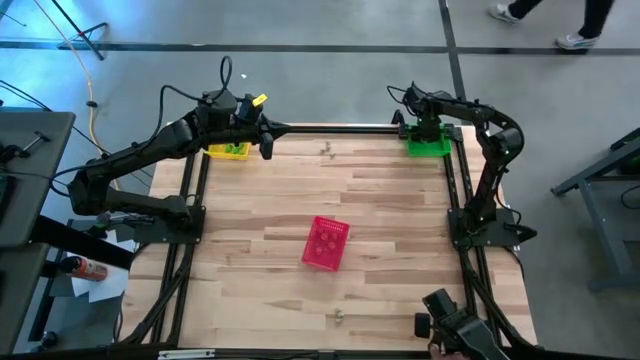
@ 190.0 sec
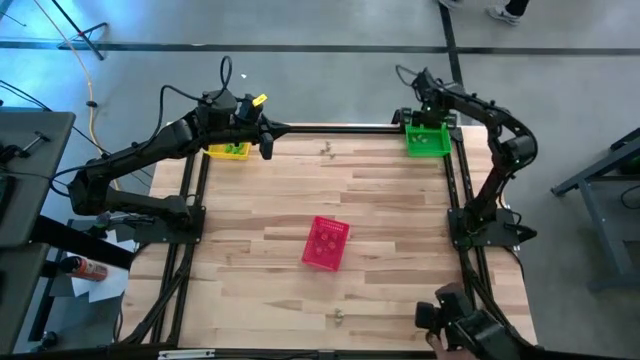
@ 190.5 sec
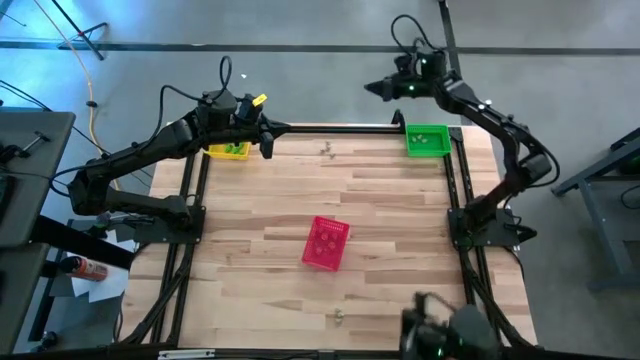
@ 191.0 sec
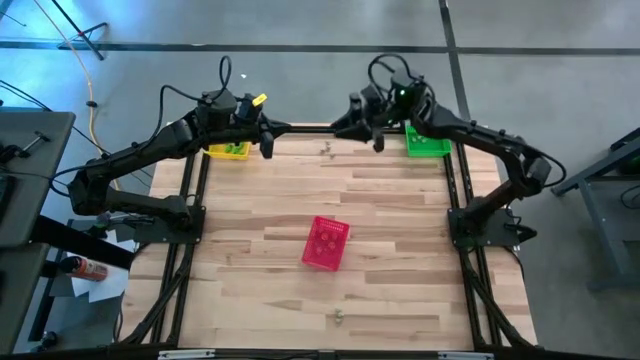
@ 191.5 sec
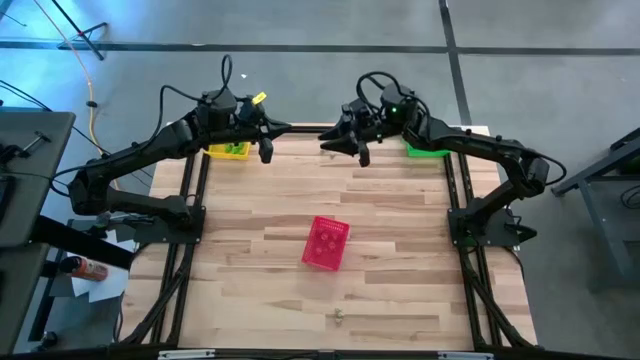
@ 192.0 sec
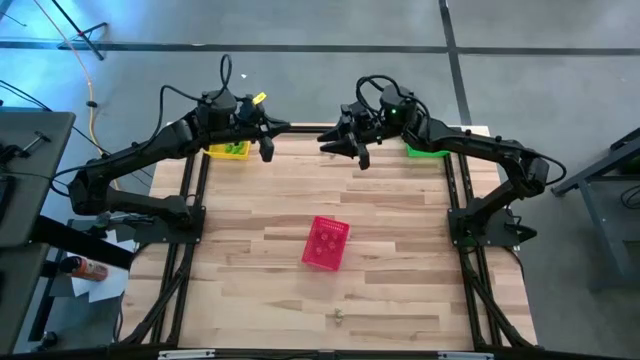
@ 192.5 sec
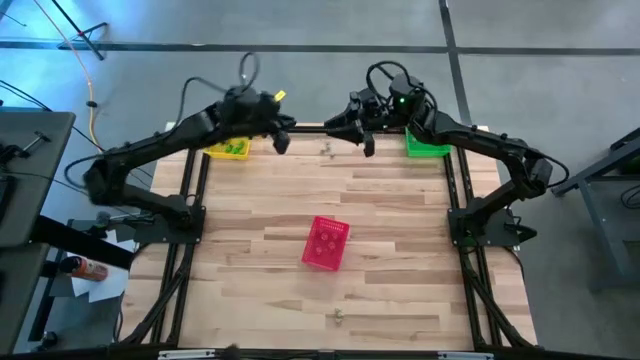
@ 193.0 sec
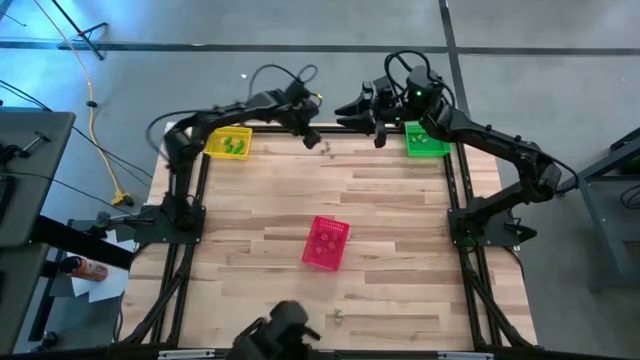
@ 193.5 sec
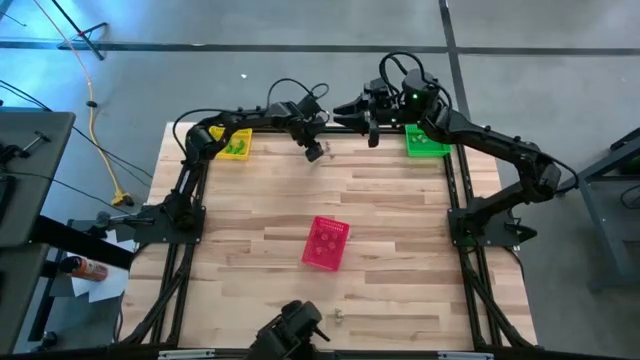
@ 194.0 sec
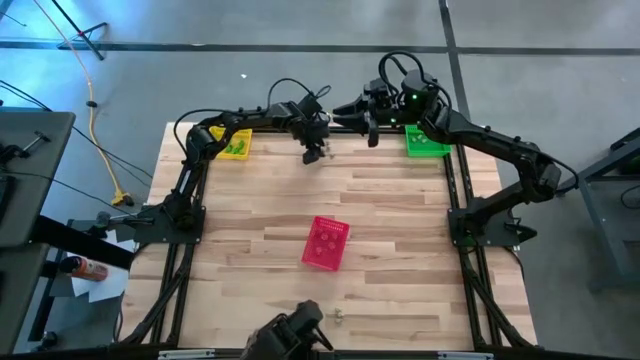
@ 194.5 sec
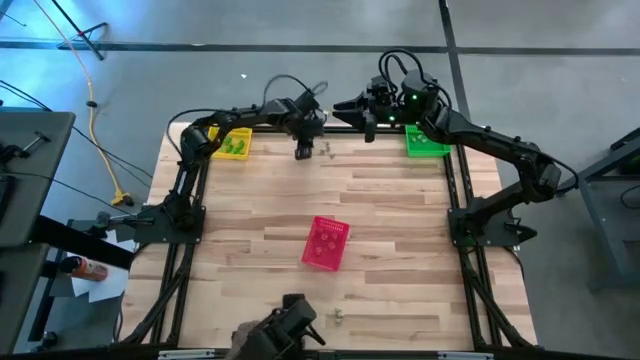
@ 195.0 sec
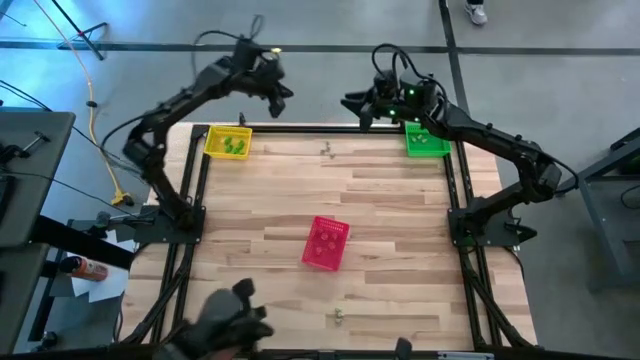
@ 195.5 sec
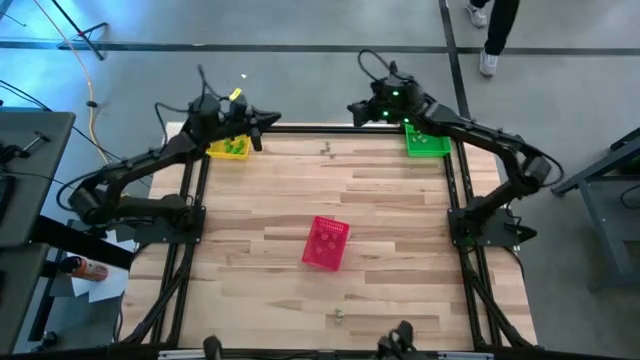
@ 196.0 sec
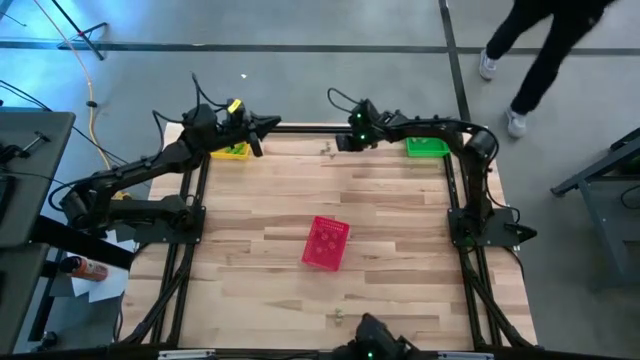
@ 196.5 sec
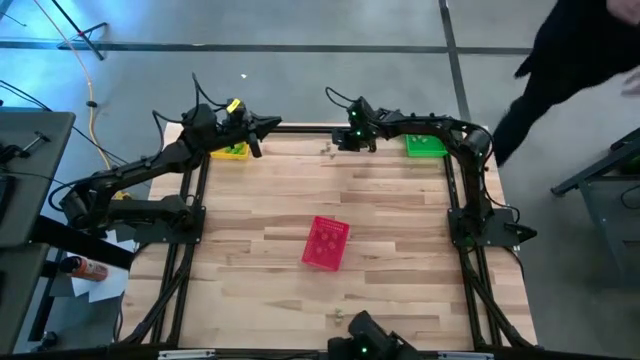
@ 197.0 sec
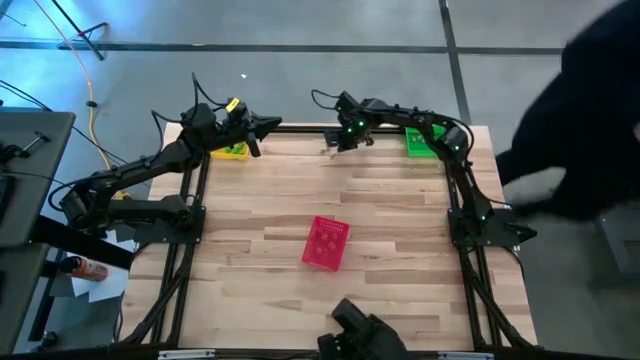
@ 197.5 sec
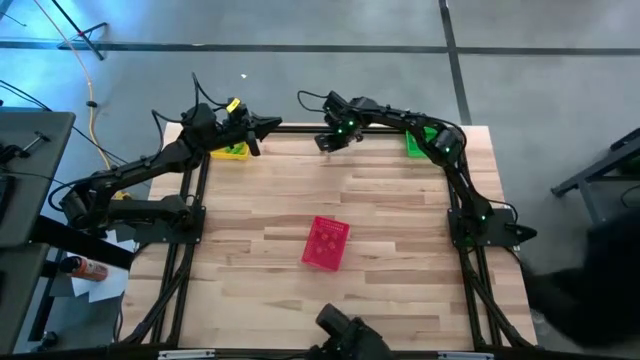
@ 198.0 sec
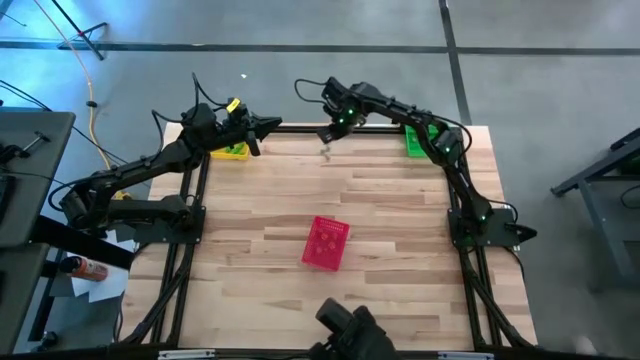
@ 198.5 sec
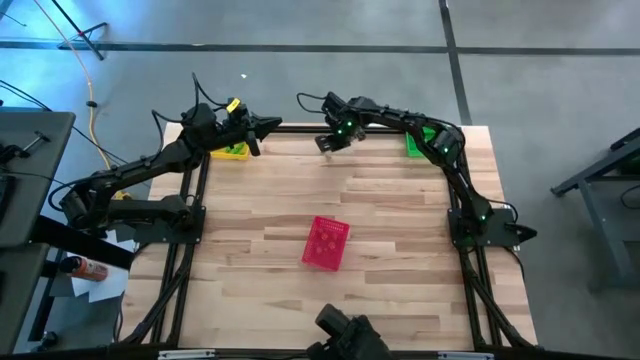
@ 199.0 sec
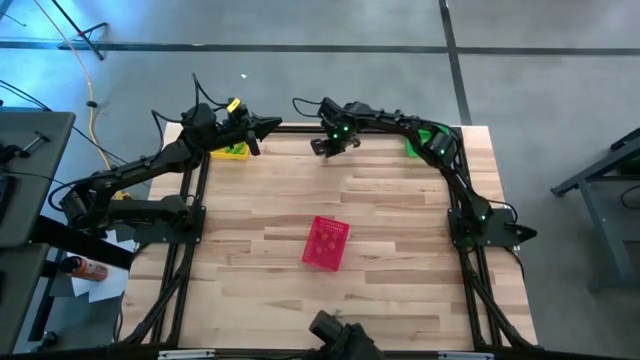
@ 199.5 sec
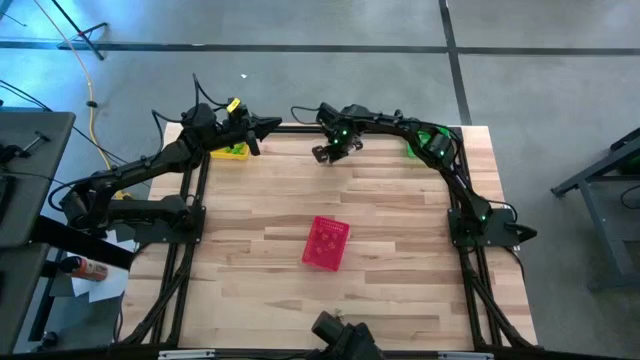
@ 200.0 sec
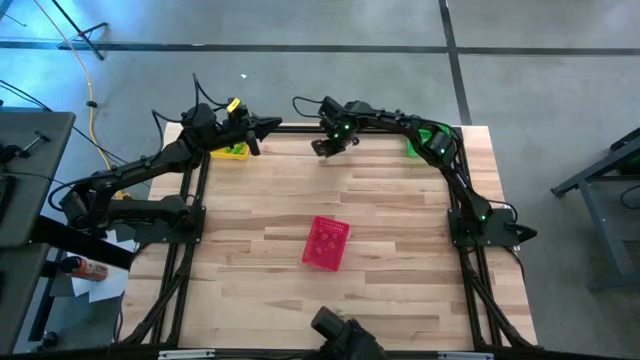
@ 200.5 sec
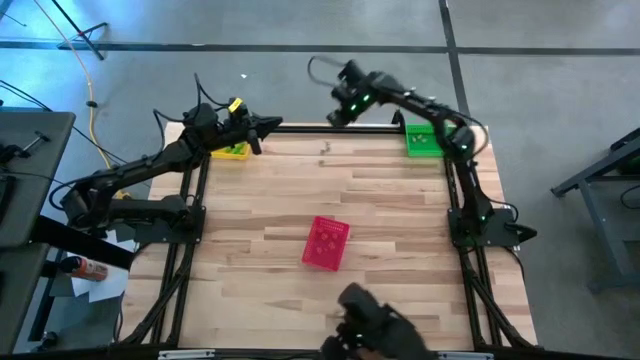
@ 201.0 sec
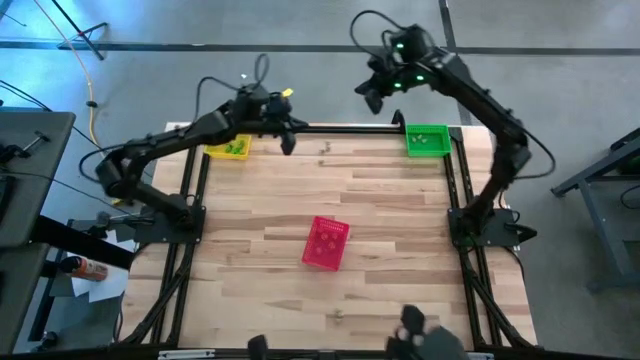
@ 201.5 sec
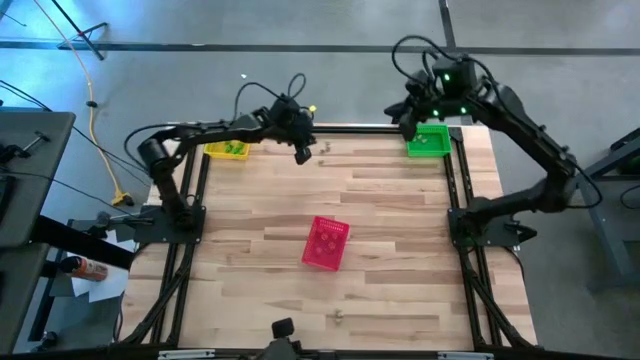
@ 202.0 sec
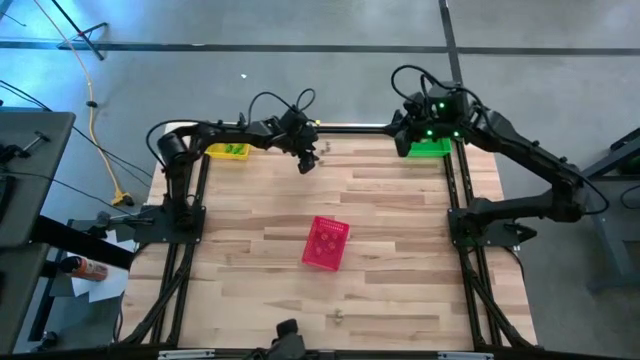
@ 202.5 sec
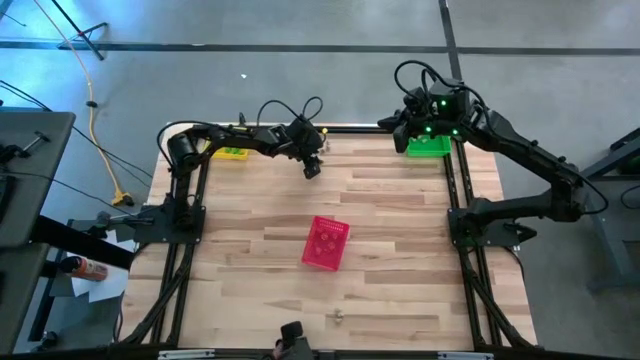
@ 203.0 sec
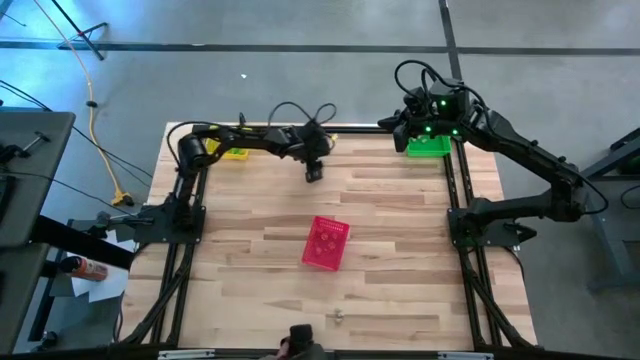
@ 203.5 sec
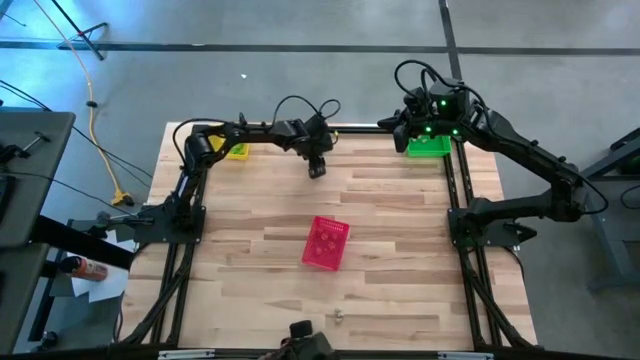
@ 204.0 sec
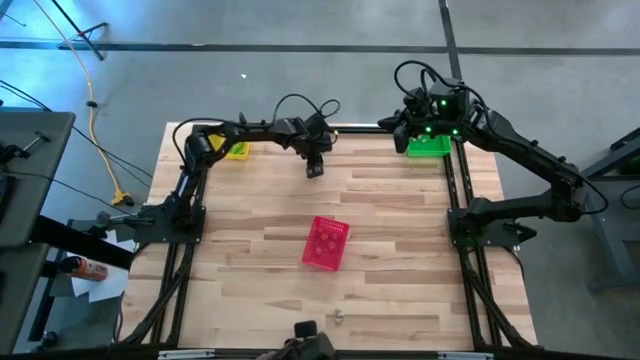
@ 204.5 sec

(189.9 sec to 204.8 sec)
Task: Sort Halloween decoration
Put the white skull toy into the green bin

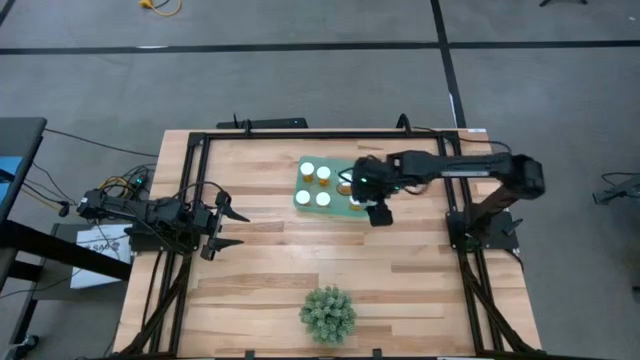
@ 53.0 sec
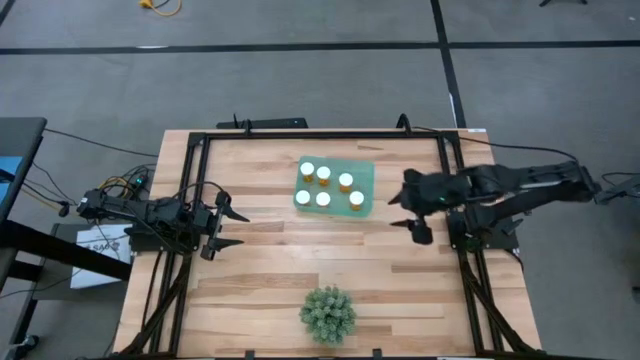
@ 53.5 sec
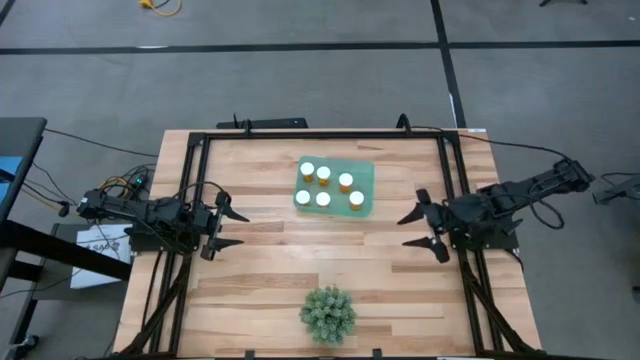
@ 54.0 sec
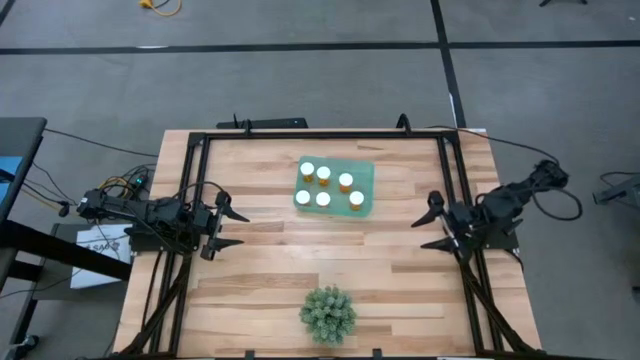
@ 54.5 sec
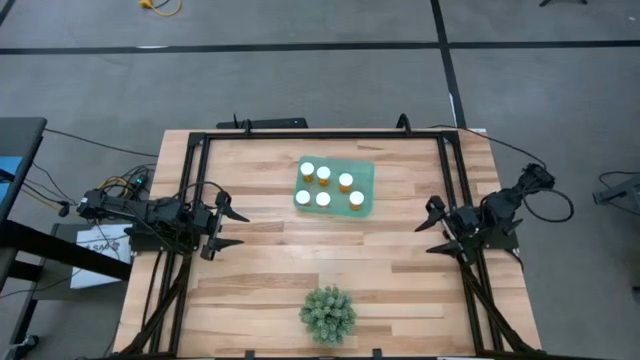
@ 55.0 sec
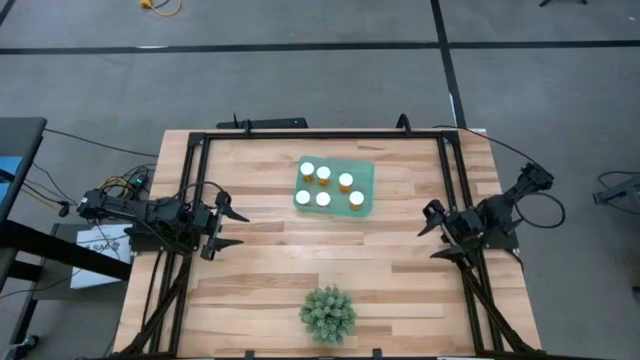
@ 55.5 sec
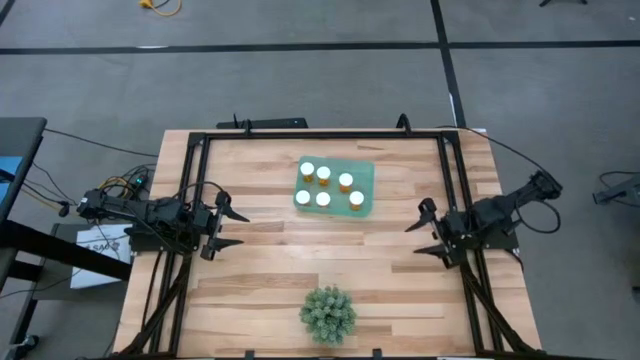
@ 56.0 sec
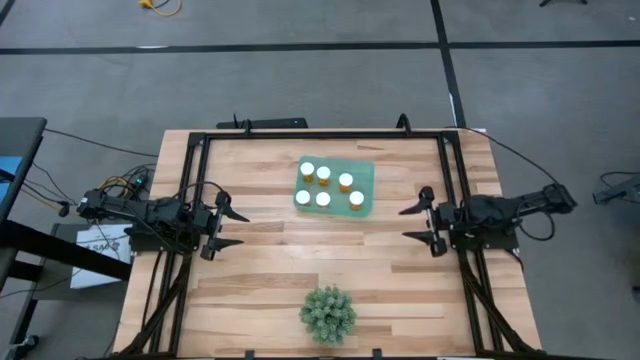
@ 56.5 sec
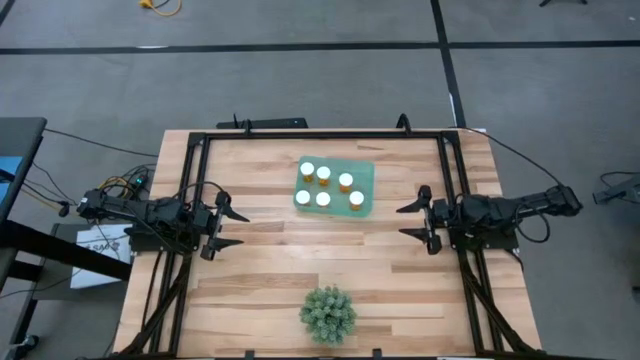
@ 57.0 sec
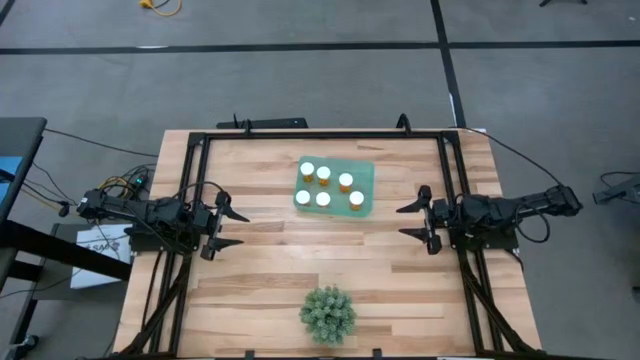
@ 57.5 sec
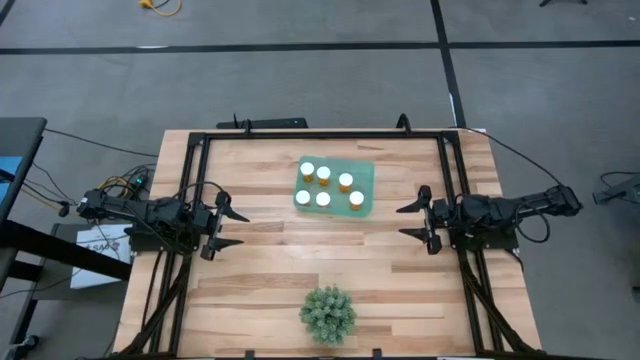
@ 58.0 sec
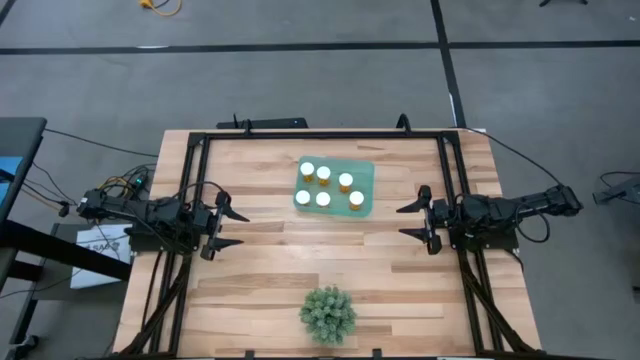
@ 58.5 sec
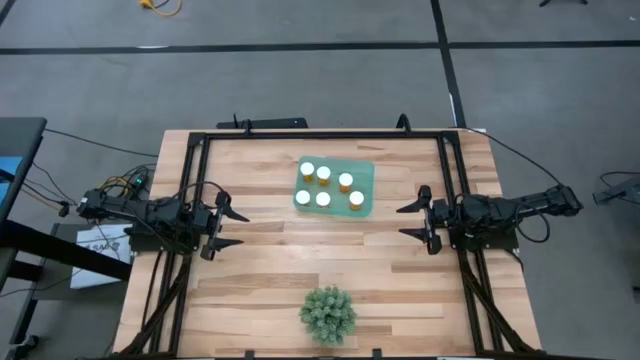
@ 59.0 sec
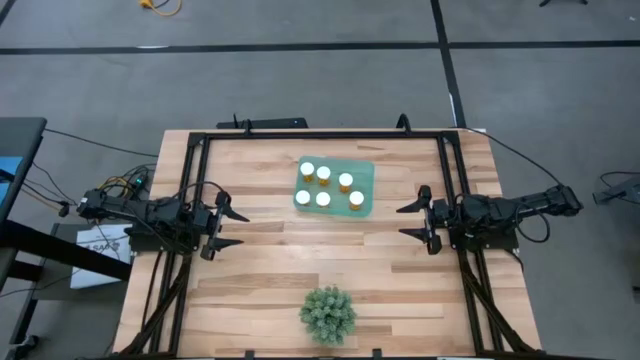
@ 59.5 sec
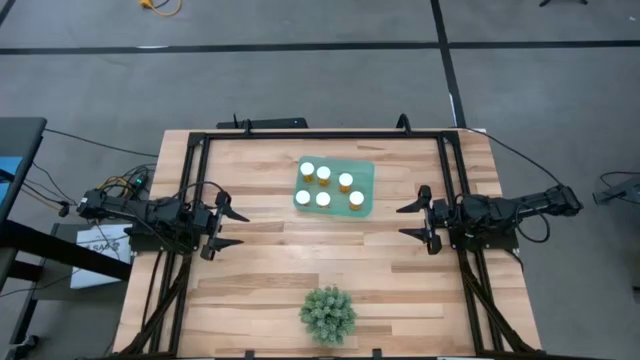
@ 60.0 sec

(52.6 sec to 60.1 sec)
Task: Pick and place pill bottles into a basket
Return to Home Position
